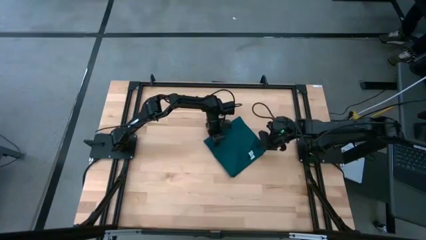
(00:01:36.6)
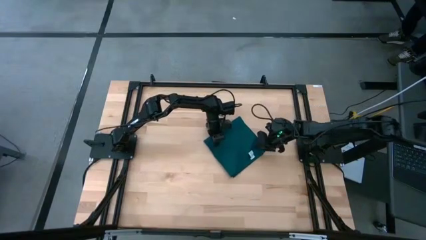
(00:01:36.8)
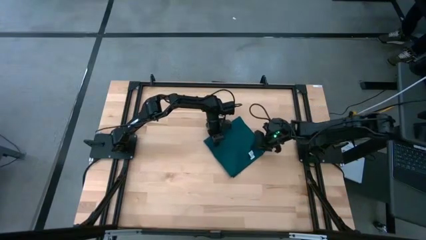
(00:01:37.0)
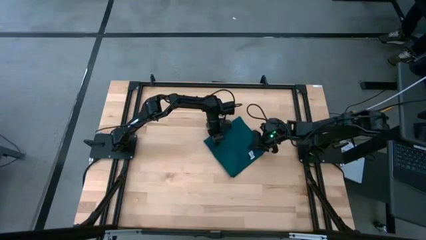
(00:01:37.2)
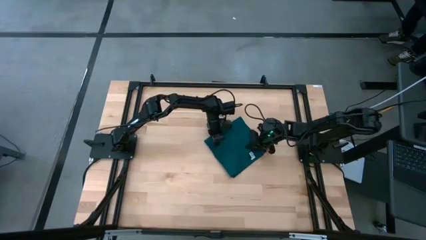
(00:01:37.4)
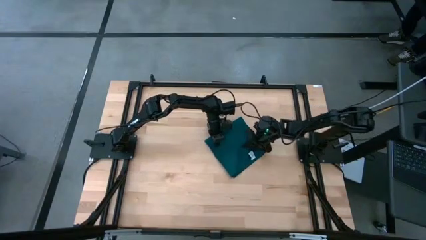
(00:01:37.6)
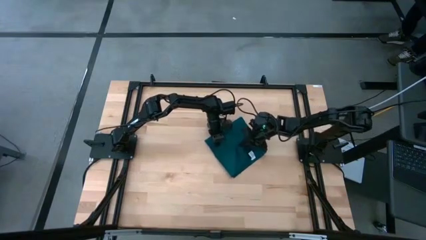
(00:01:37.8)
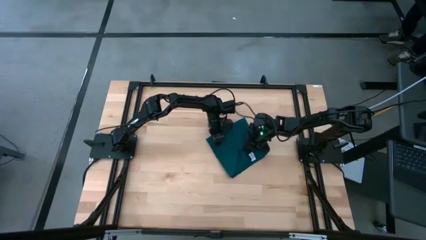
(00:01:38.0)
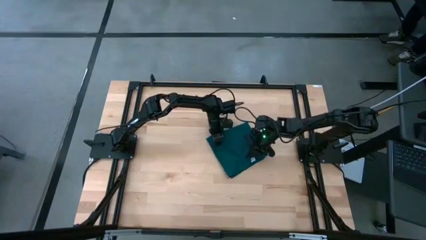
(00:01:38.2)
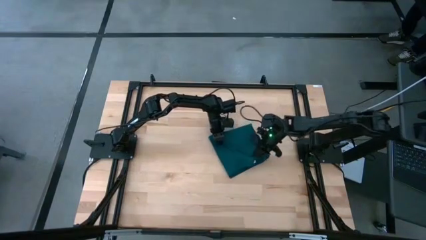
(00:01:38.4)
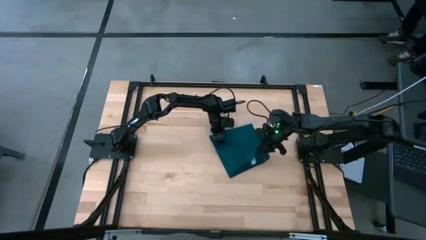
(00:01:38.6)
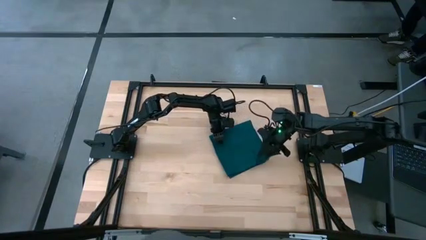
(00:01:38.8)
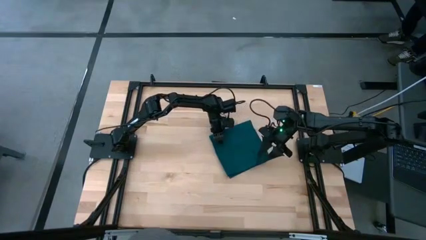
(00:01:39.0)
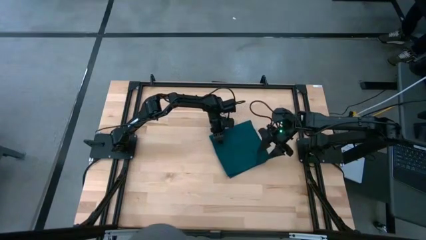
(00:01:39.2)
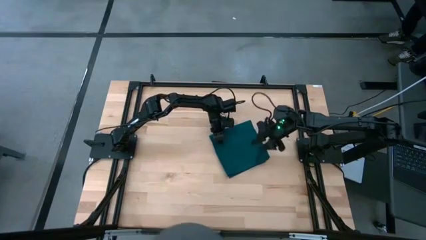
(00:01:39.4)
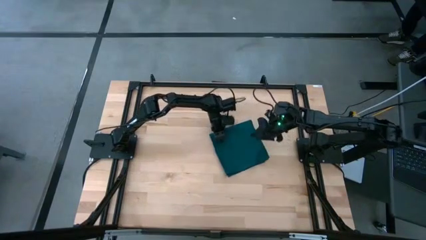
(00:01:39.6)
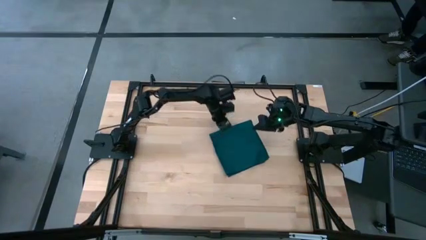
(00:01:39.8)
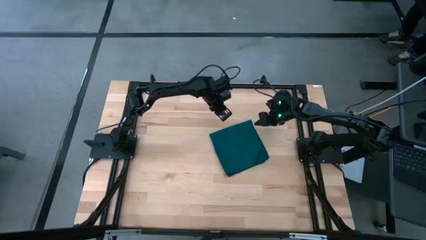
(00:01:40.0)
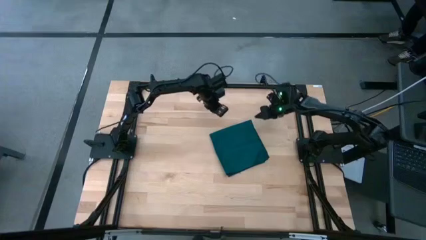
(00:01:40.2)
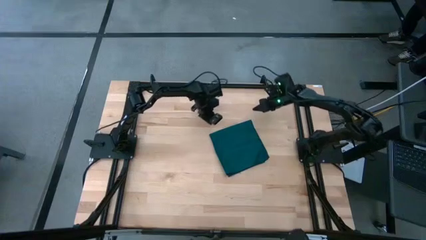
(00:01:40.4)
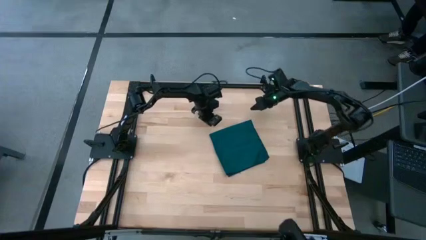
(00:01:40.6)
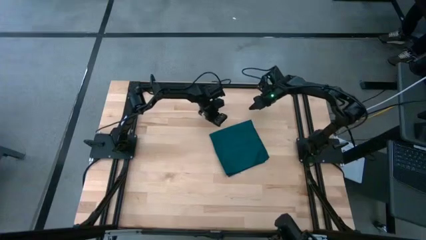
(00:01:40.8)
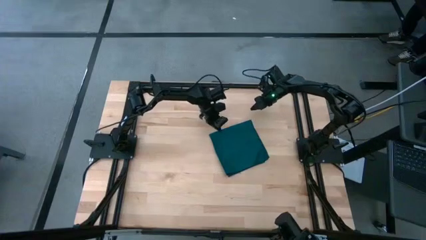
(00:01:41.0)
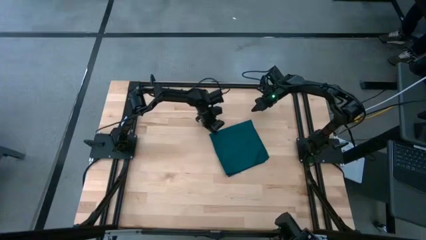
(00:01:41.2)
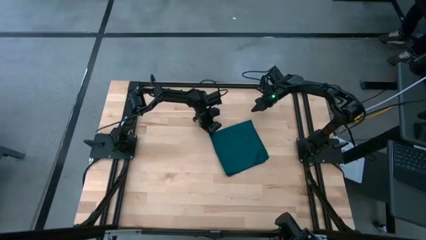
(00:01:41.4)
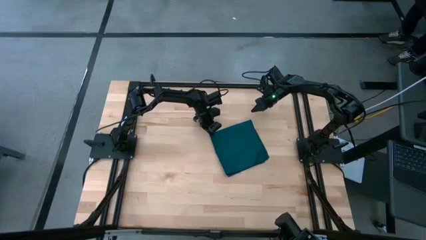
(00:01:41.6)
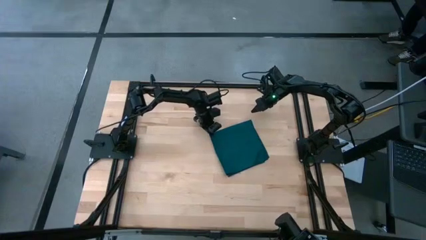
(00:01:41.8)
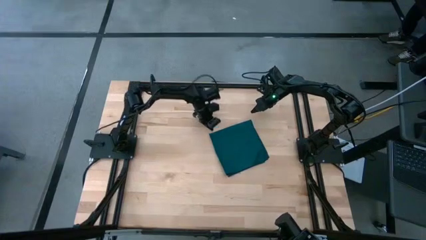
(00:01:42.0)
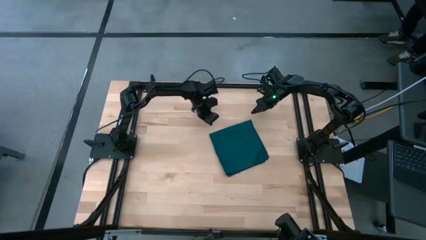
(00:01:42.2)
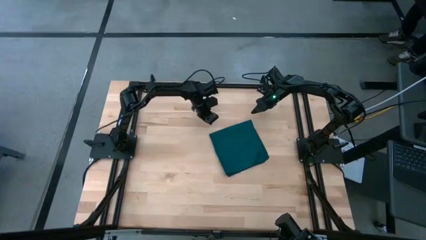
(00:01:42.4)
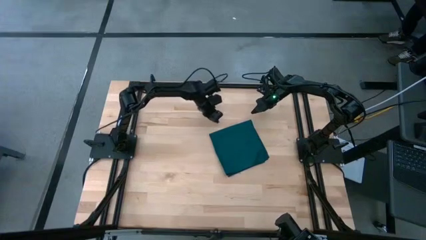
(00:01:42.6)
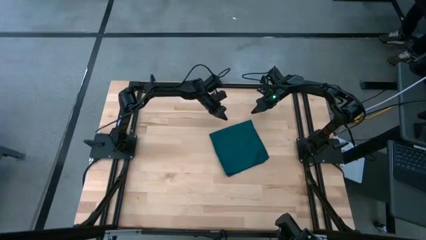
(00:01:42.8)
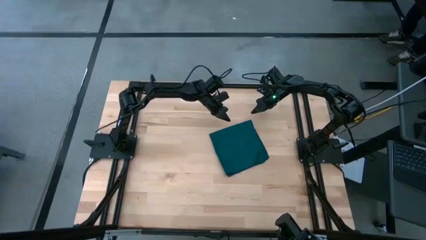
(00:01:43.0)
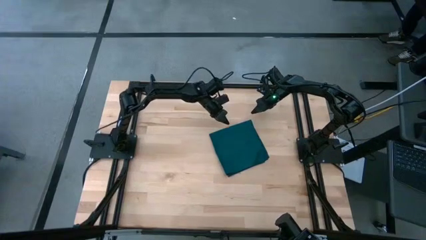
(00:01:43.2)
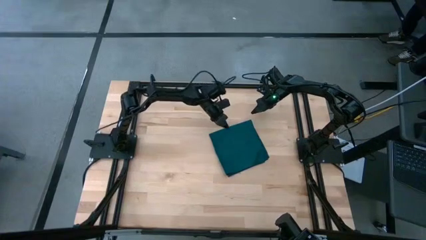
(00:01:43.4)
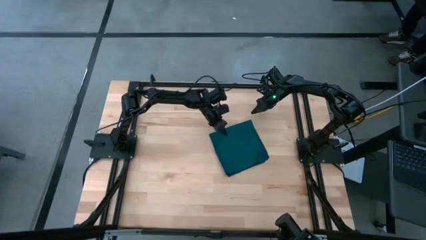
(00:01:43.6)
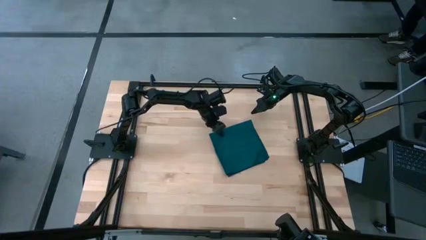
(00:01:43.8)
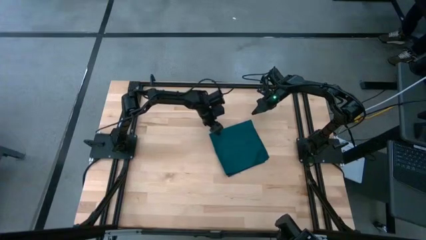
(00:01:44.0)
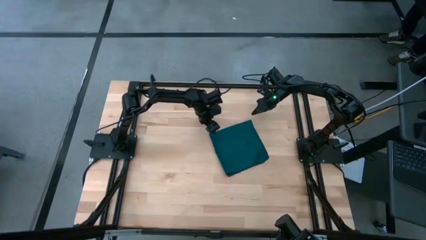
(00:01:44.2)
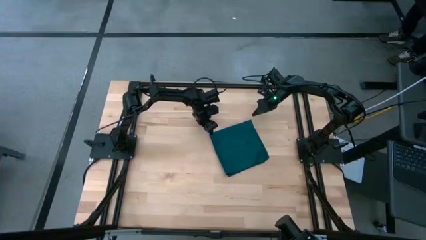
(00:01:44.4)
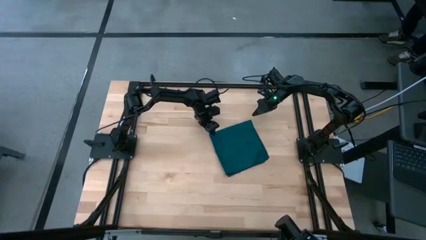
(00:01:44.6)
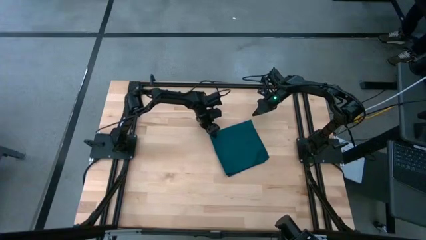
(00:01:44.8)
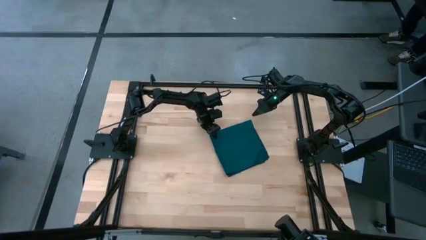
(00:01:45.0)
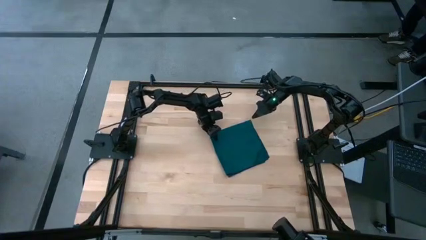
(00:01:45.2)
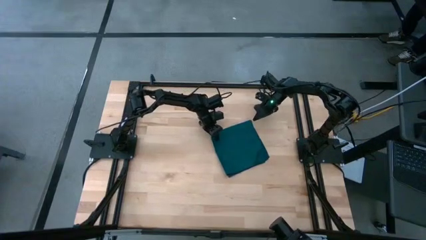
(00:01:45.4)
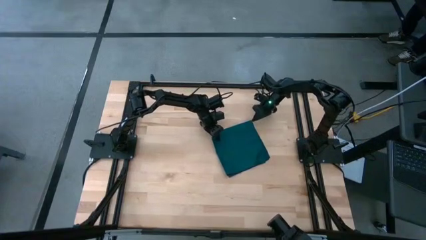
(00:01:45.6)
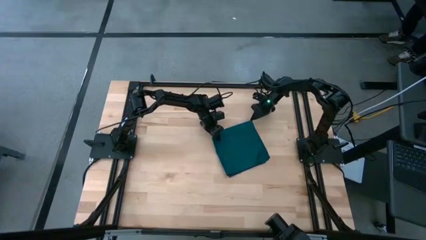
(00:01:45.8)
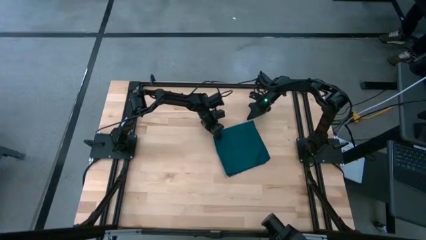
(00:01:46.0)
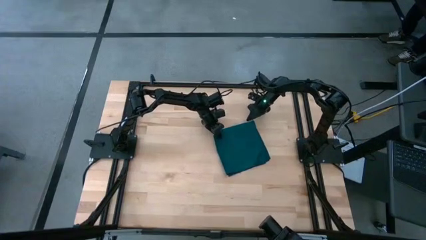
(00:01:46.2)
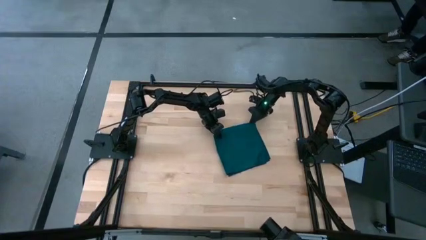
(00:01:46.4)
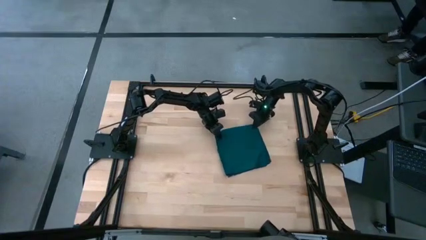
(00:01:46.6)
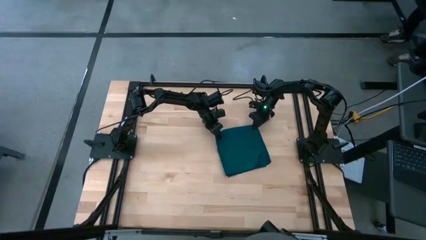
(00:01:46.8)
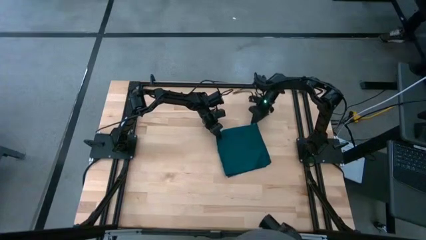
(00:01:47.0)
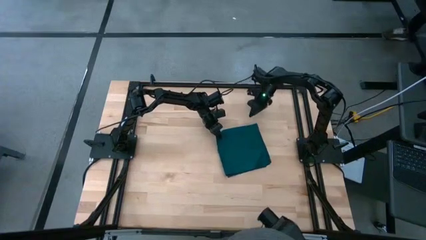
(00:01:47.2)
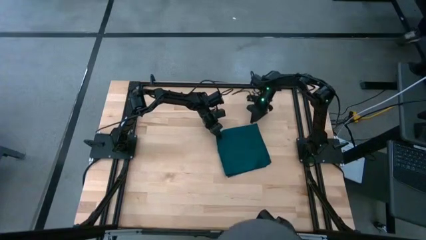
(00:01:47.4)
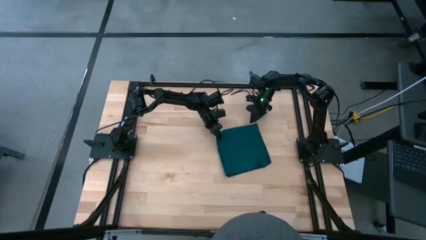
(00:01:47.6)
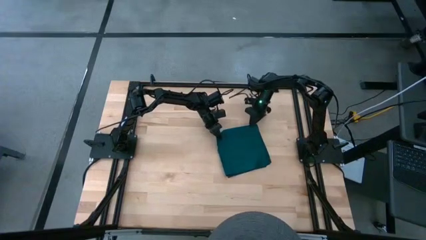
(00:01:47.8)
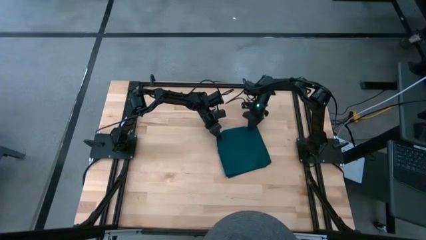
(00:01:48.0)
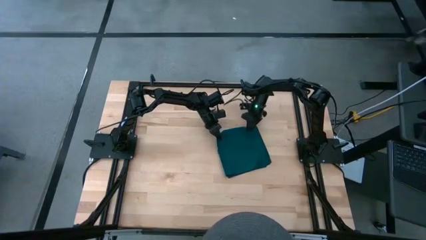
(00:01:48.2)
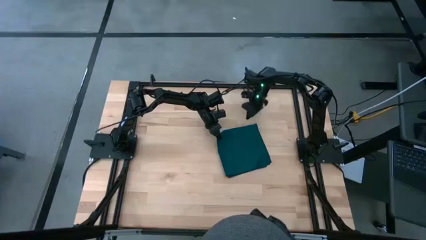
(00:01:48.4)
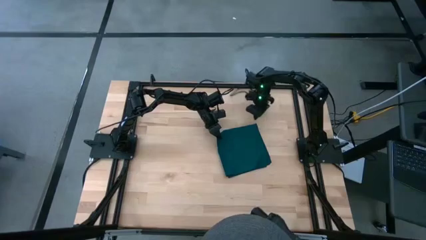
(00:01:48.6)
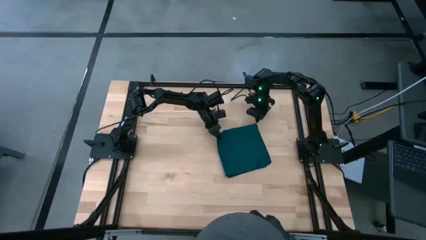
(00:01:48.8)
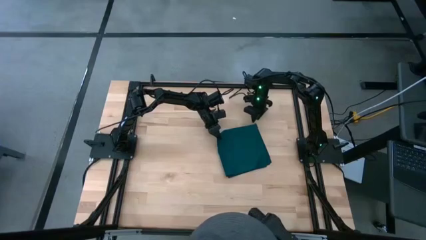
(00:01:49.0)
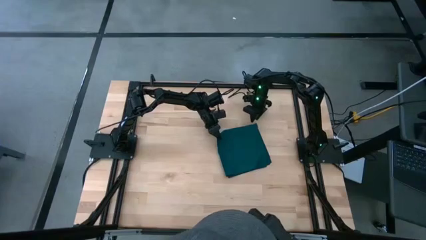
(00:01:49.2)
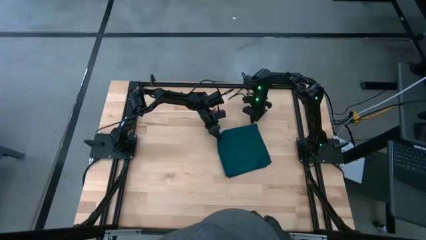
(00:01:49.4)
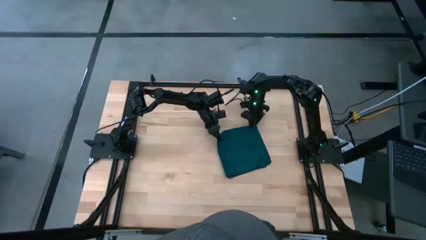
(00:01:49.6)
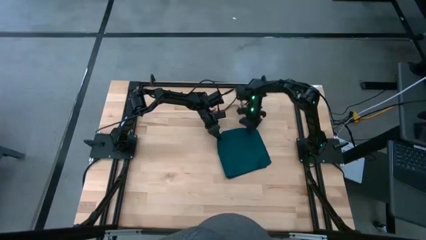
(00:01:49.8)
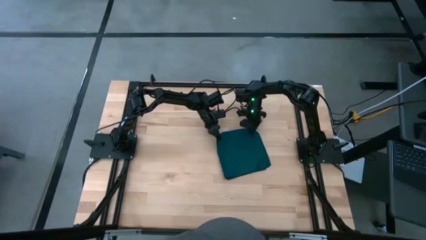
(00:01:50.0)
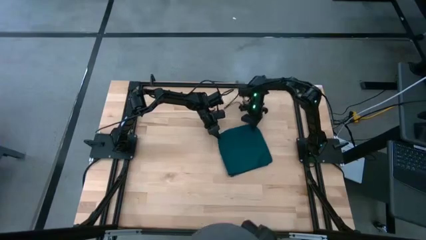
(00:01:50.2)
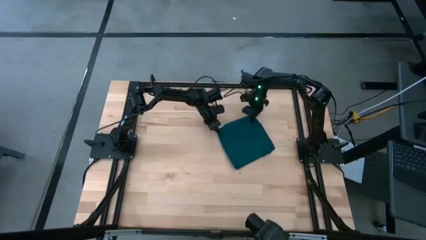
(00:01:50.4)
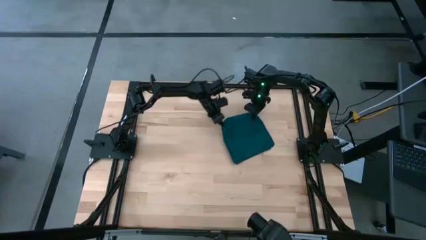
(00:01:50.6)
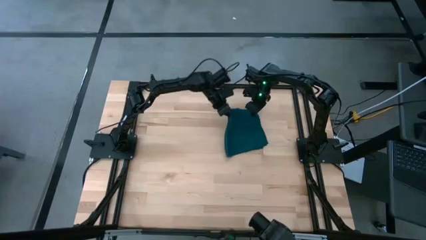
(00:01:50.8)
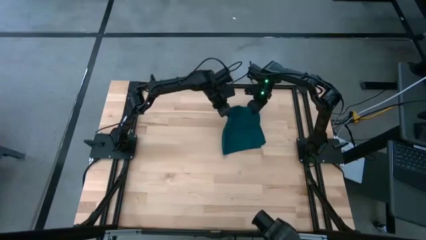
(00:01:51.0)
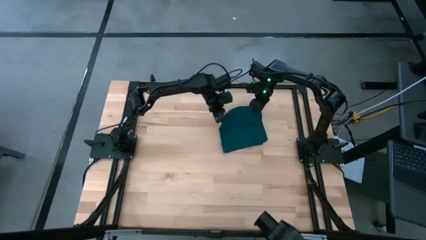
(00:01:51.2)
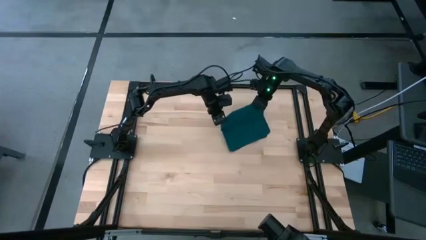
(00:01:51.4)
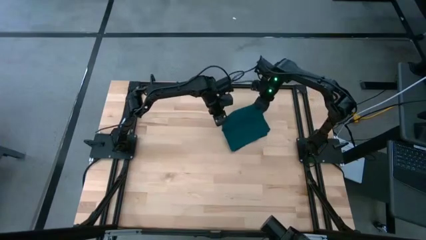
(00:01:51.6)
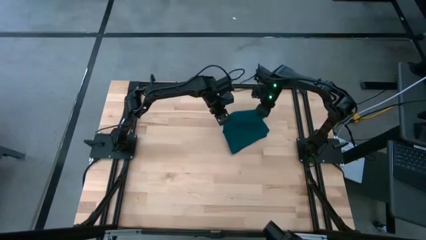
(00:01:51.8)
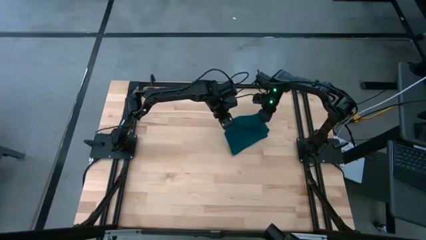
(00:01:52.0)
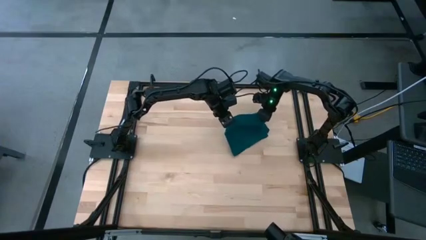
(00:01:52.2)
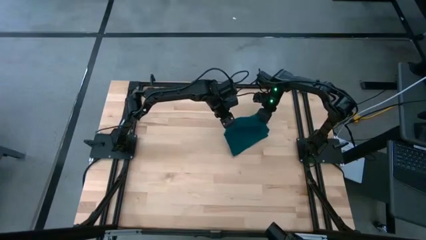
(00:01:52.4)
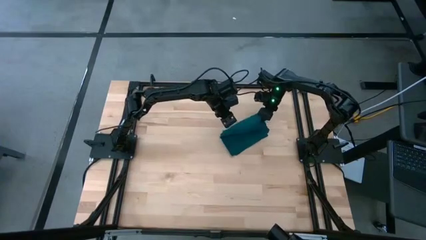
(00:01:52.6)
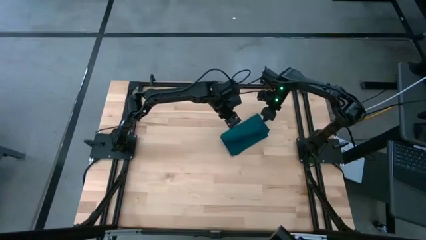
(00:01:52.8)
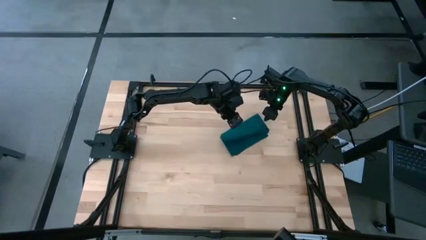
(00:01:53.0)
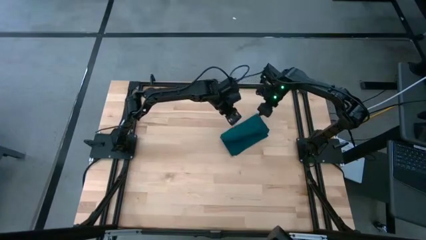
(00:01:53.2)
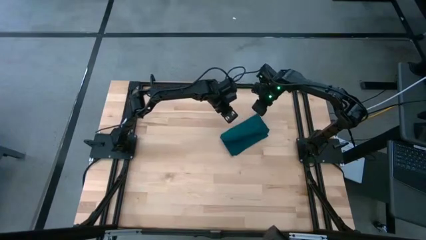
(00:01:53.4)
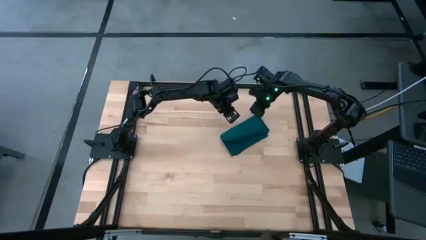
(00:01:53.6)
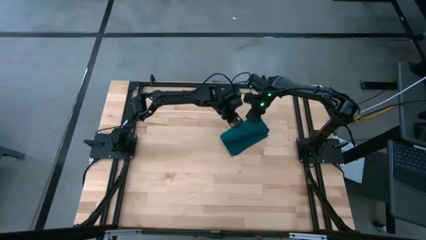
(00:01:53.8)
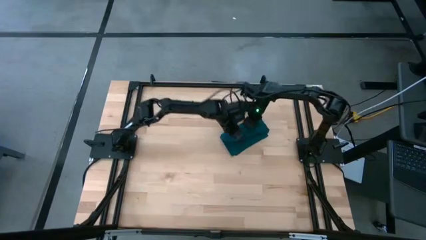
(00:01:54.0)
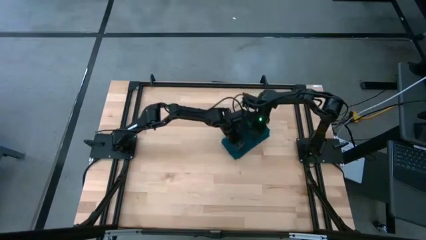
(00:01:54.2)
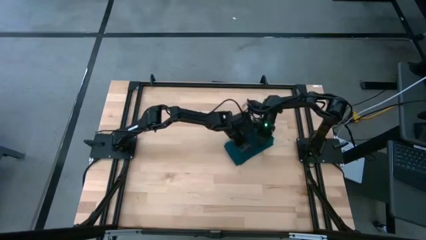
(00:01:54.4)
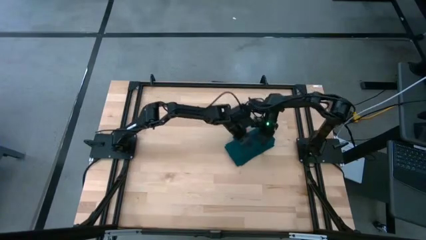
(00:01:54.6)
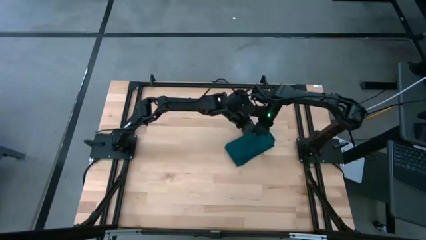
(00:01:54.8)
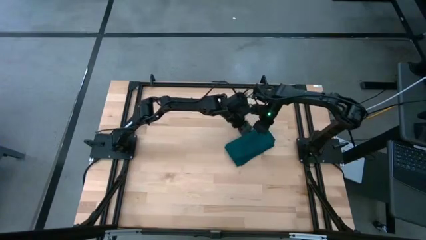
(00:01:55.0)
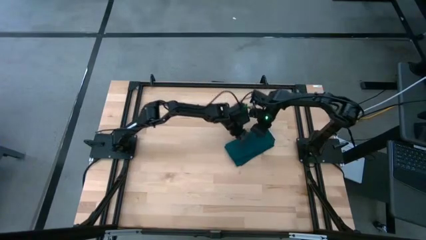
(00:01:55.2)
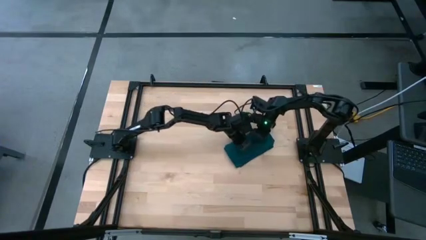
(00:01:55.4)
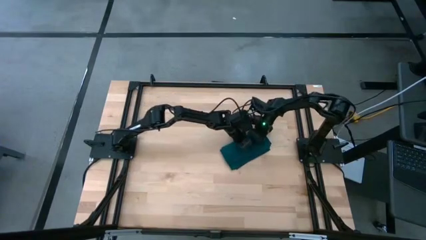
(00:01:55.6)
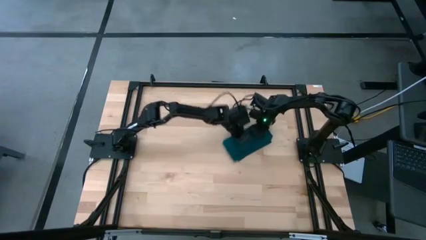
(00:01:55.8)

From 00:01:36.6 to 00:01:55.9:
Task: Fold microfiber towels
Fold the black towel on the table
